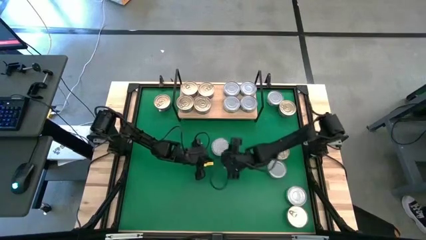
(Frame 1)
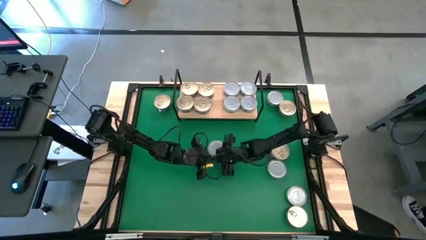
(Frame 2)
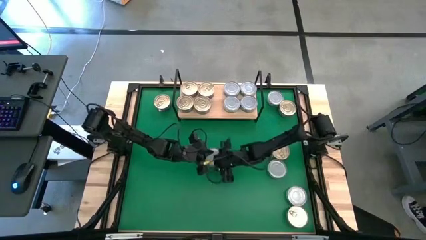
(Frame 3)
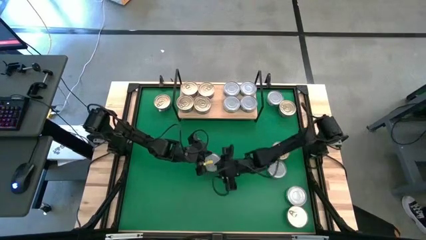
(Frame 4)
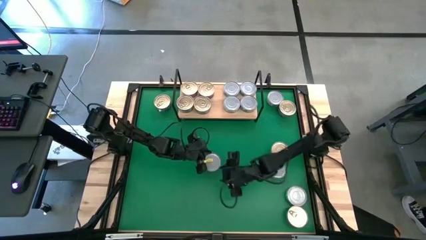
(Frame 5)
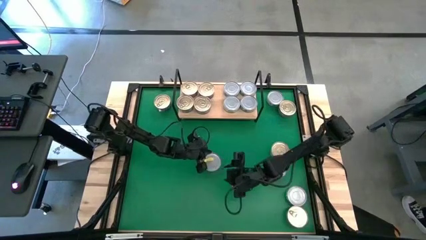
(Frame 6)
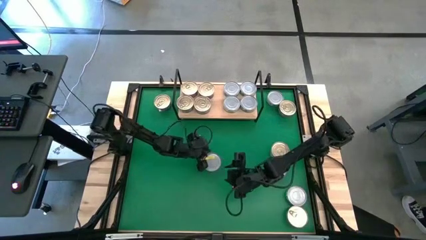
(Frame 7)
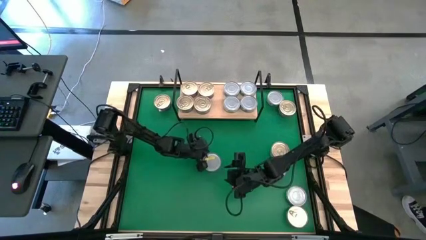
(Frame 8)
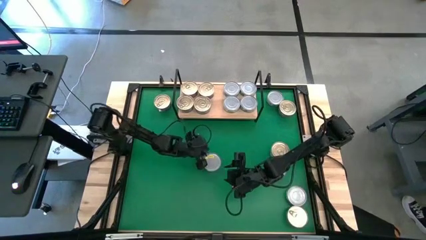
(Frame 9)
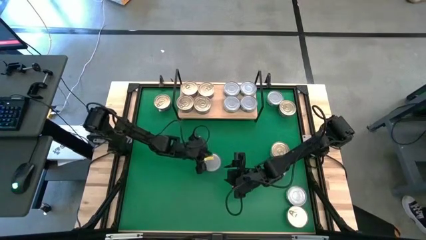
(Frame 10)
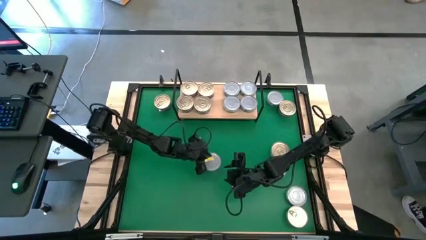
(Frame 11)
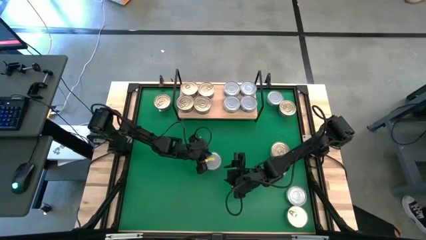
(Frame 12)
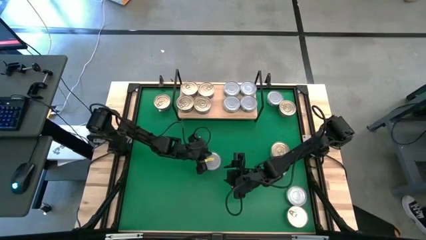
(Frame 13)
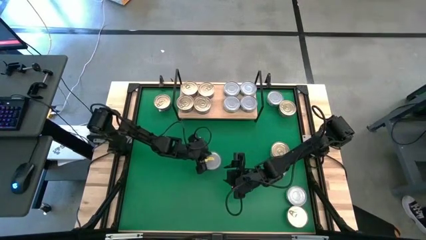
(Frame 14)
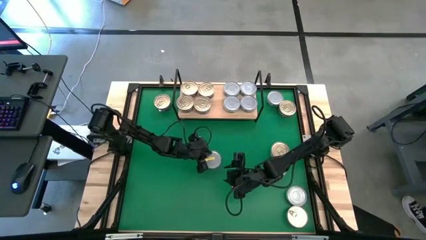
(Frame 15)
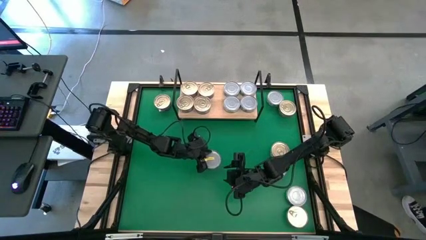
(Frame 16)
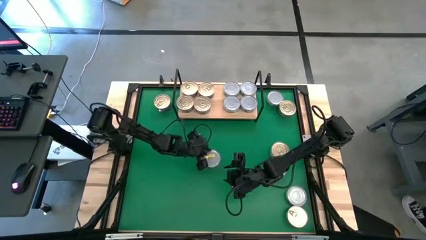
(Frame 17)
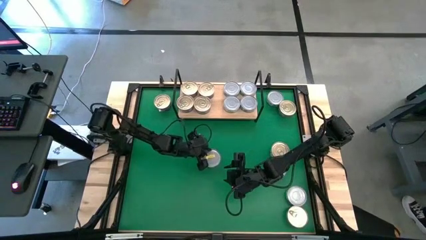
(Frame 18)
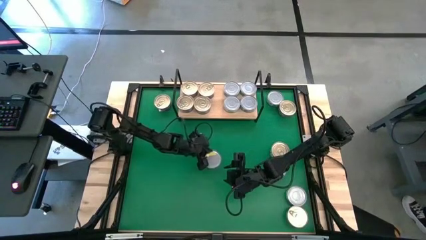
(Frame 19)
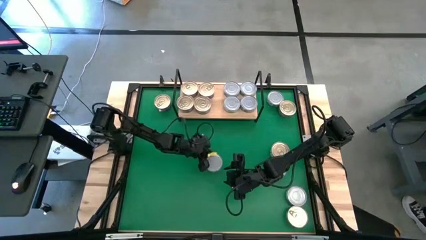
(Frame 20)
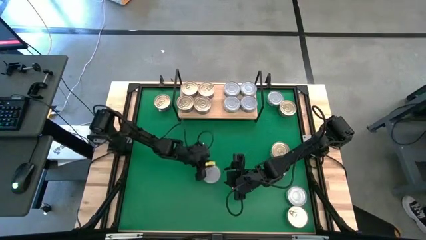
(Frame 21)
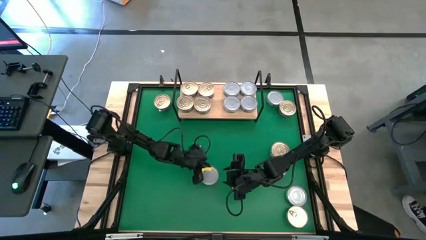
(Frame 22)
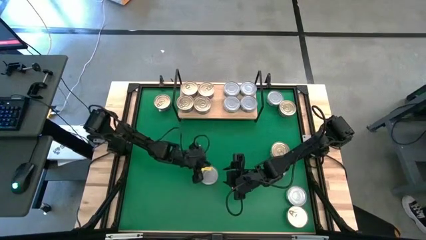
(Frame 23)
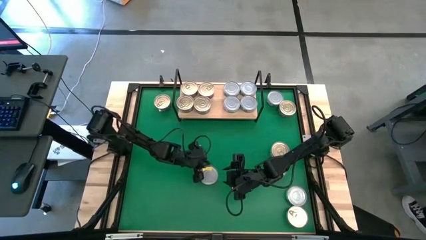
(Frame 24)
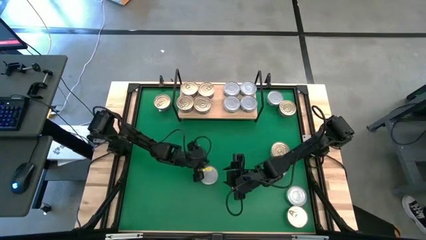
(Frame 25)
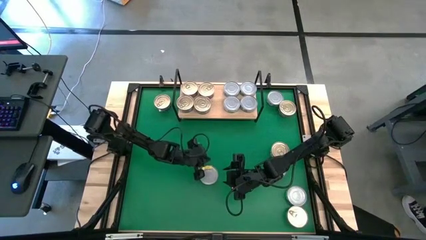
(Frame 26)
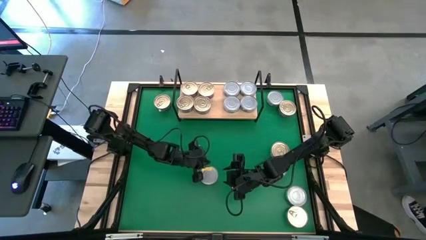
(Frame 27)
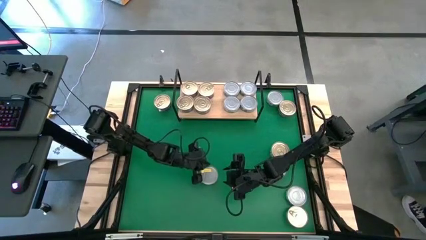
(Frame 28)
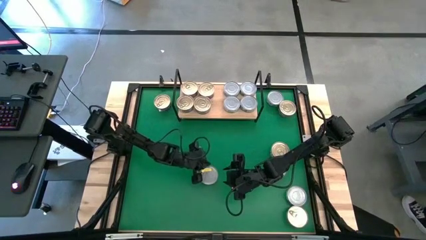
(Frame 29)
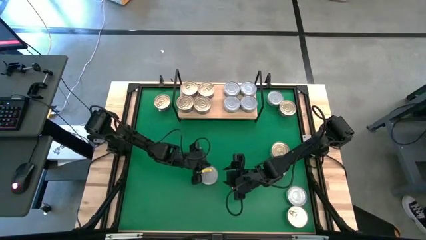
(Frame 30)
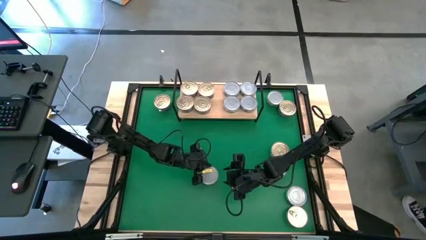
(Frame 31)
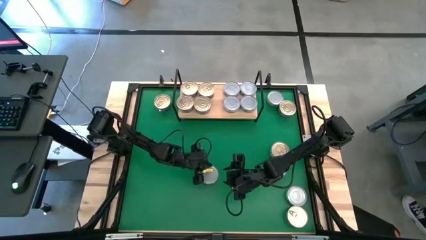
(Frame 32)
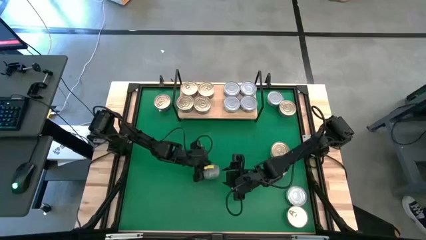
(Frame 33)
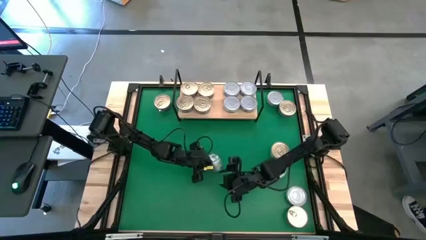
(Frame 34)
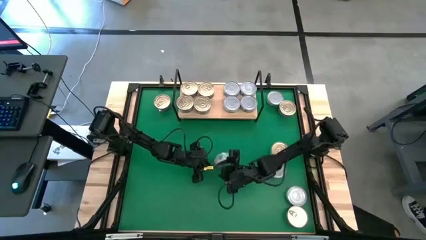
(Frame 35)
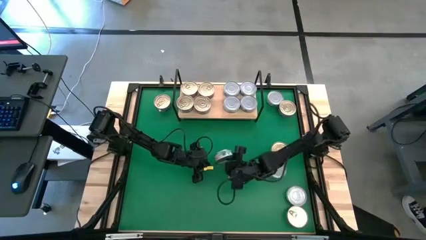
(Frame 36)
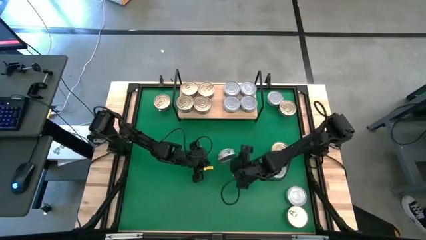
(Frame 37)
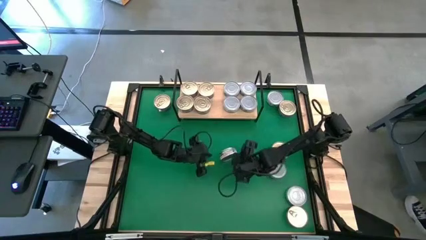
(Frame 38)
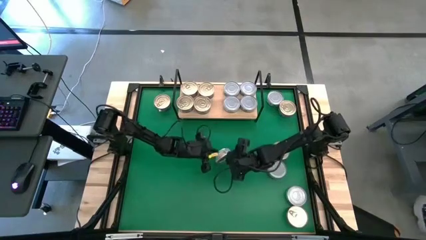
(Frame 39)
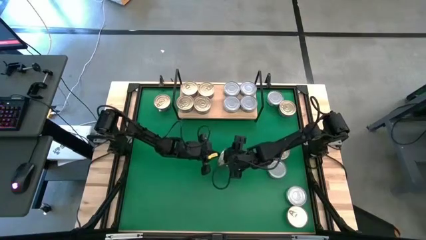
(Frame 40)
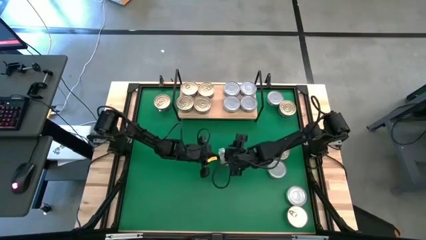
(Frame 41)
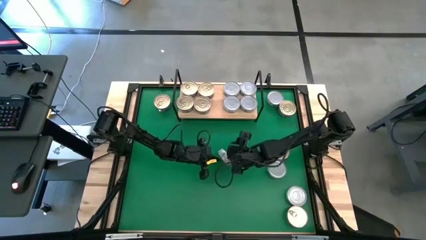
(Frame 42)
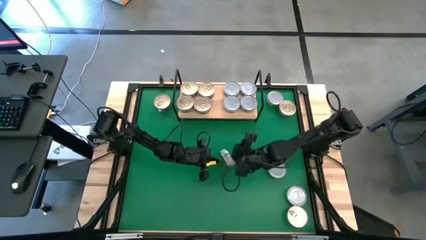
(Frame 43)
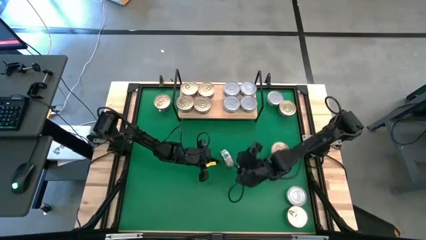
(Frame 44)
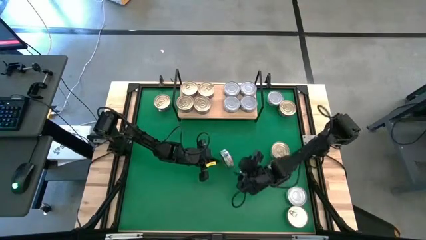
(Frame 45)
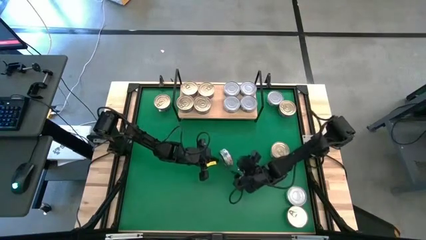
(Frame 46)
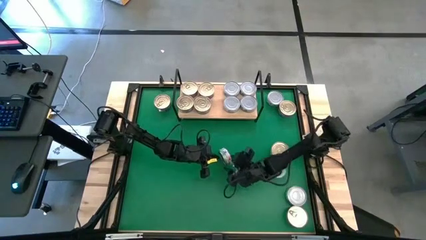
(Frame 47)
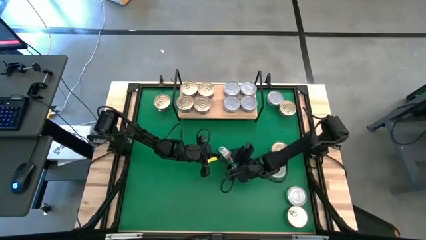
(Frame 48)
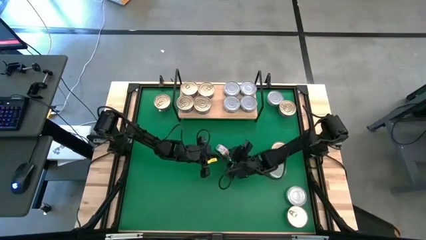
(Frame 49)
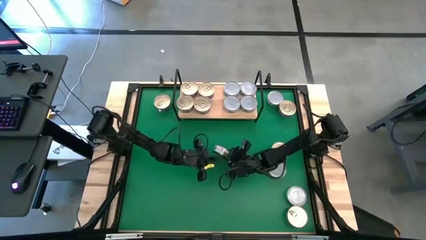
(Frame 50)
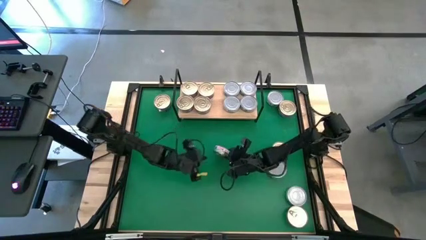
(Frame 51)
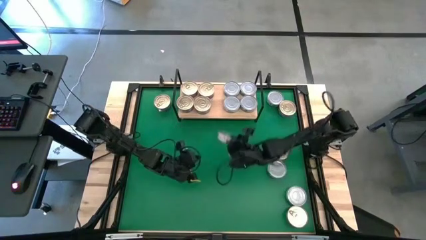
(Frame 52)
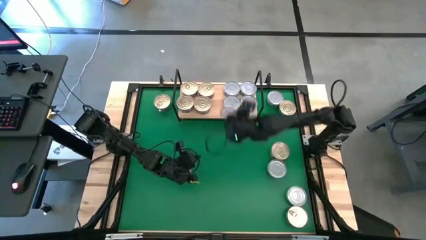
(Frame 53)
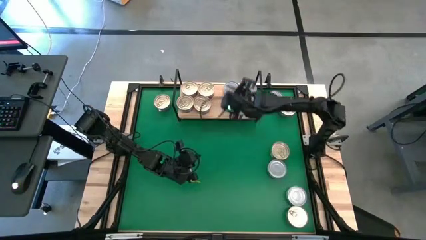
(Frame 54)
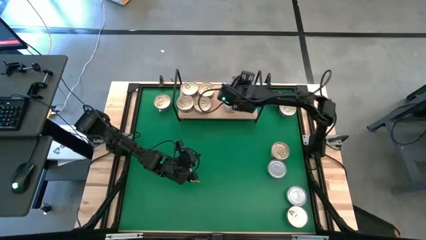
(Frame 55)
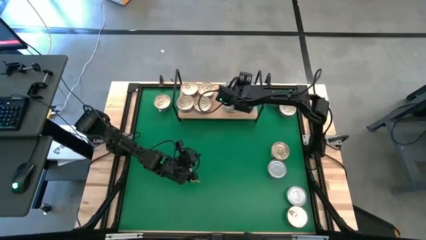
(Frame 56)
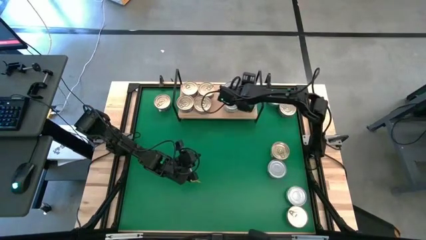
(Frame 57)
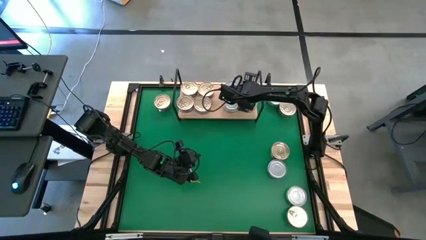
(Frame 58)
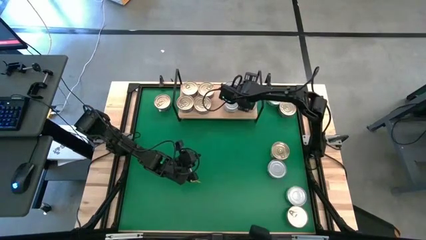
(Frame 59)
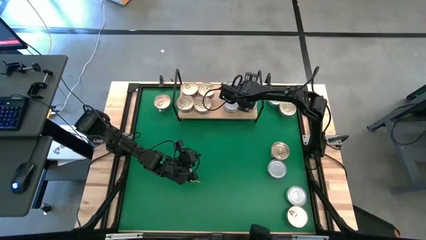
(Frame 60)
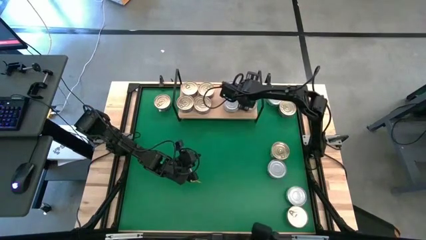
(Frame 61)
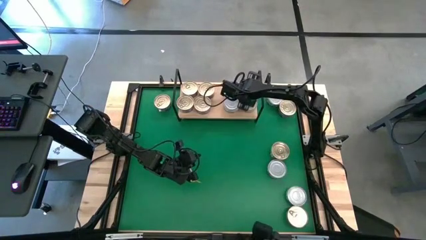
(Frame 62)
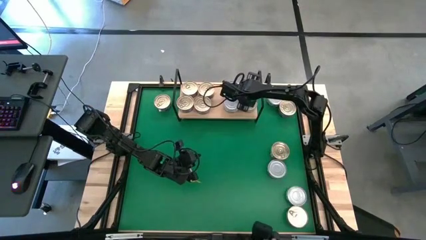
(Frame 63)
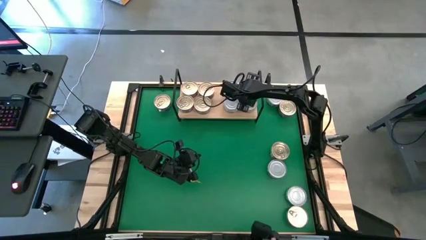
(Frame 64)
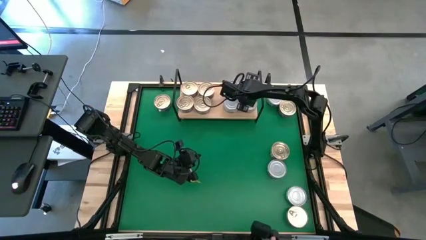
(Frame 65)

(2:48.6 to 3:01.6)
Task: Stack canned seafood by type on shelf
Stack the green white tuna can on top of the other green white tuna can on the shelf

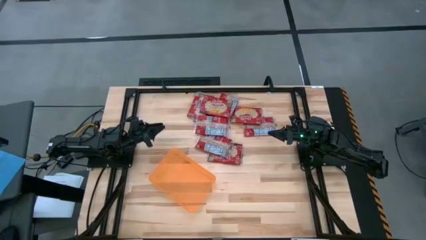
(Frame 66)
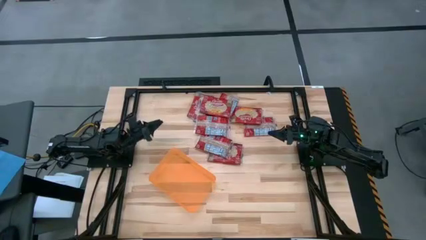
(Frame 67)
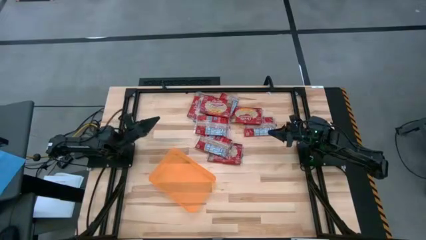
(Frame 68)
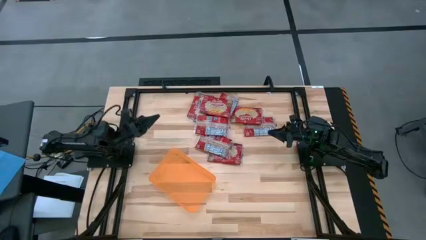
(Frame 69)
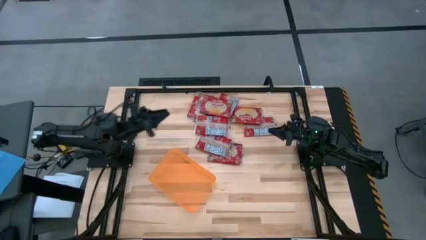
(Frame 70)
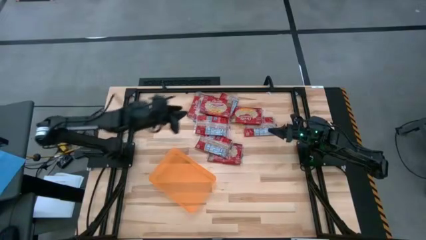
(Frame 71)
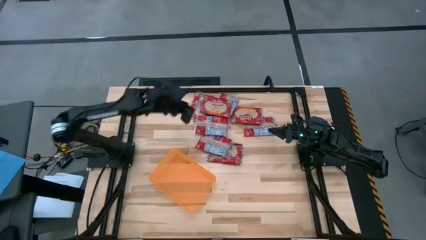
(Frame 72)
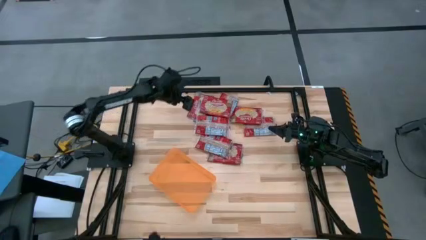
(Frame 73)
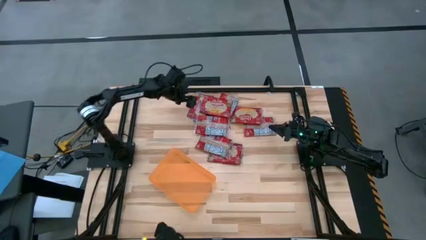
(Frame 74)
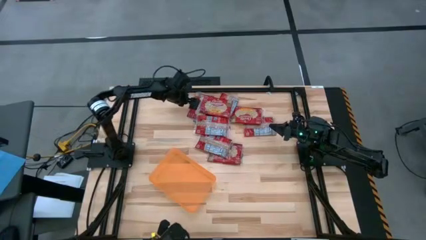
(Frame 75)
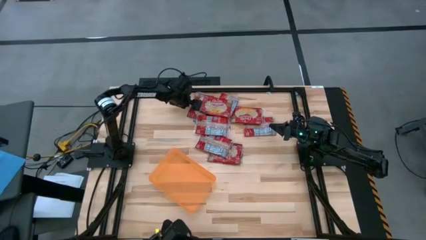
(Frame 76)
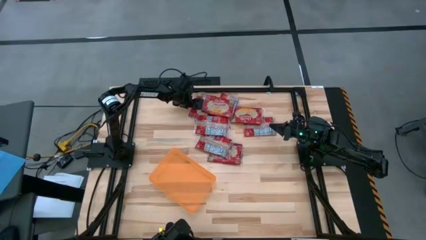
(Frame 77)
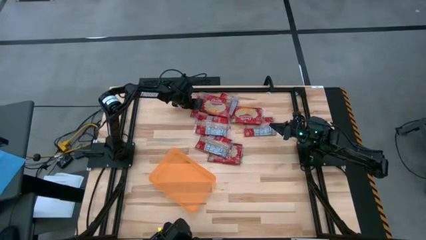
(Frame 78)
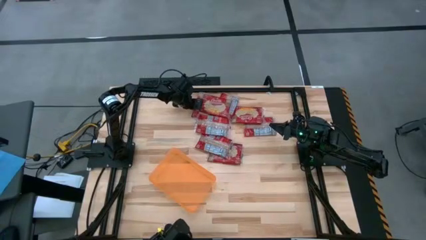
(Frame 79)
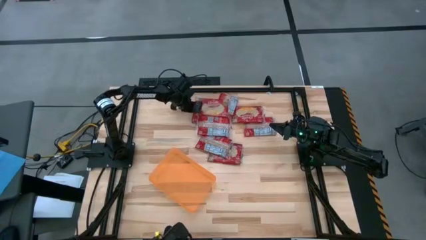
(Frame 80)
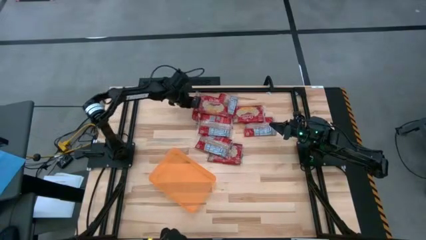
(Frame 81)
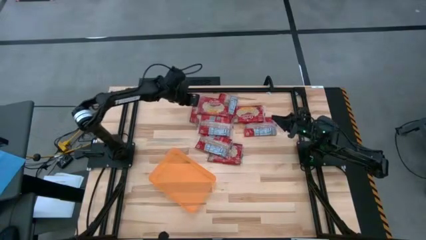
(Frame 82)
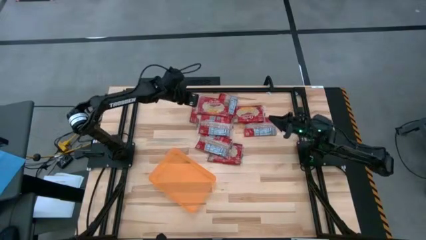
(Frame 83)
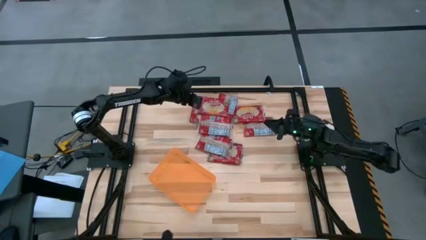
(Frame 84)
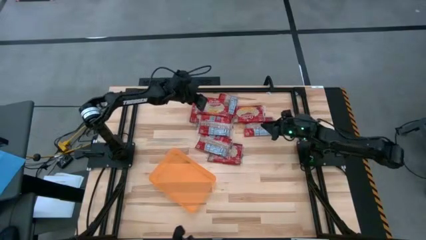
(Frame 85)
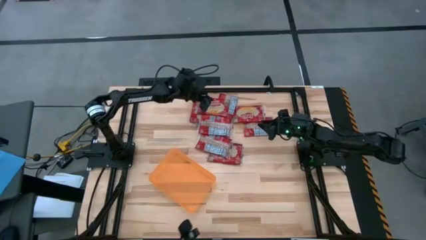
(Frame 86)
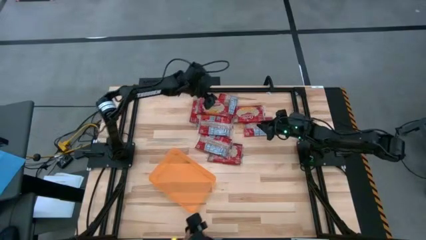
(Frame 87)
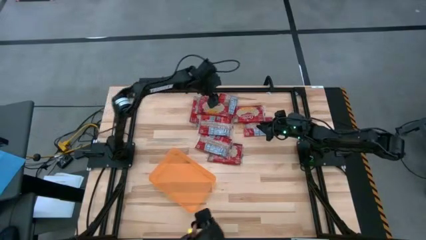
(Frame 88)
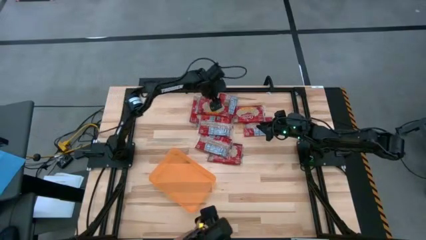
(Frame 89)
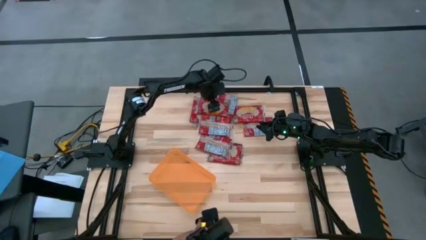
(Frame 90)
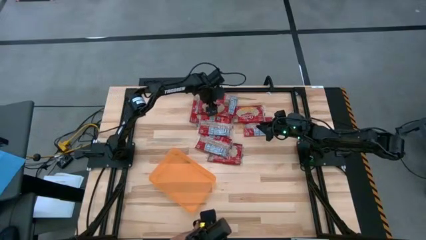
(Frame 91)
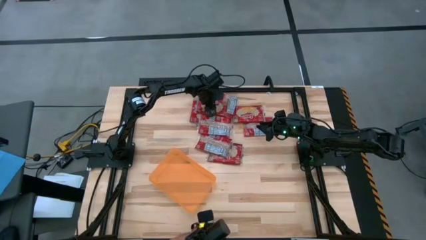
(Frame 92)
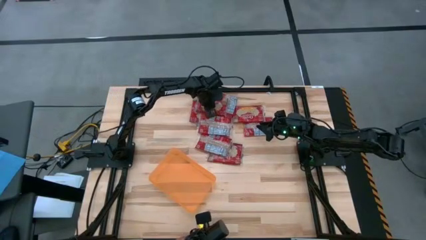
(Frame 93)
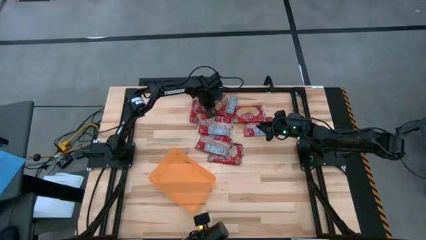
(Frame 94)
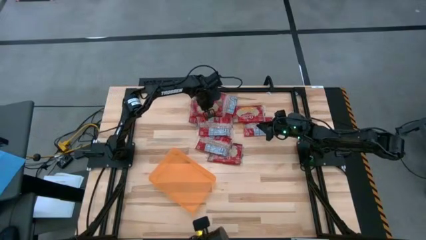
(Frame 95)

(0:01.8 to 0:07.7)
Task: Sort popcorn bags into baskets
Put the popcorn bag into the orange bin
